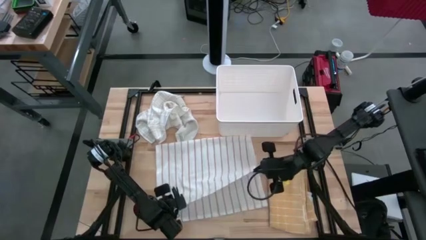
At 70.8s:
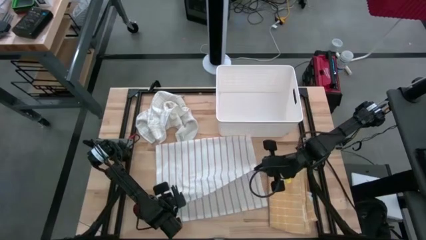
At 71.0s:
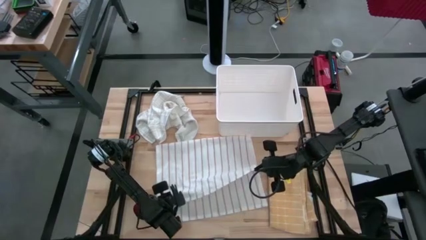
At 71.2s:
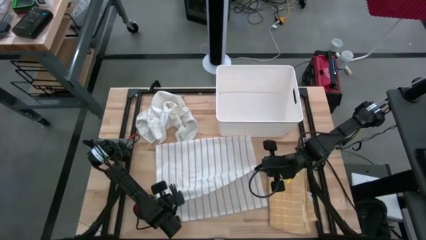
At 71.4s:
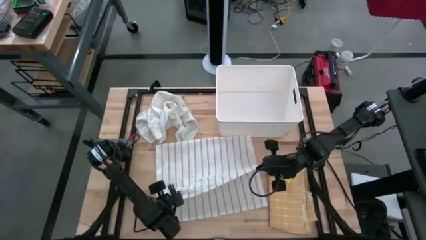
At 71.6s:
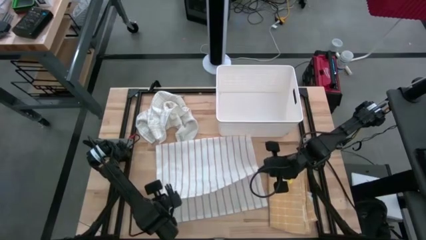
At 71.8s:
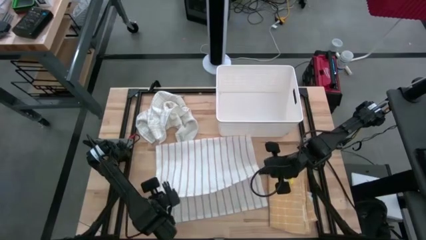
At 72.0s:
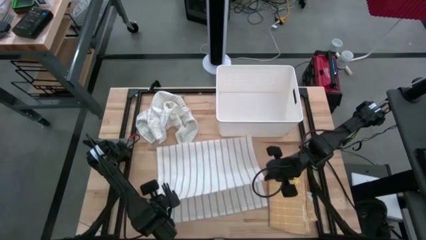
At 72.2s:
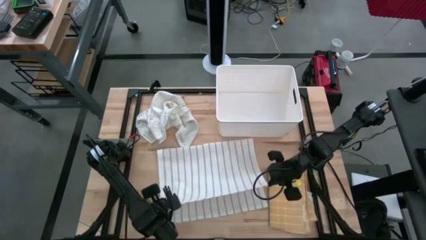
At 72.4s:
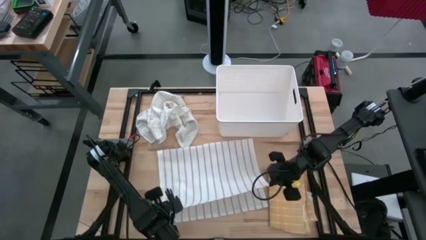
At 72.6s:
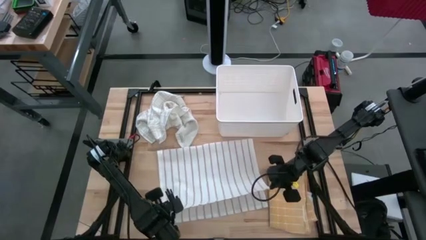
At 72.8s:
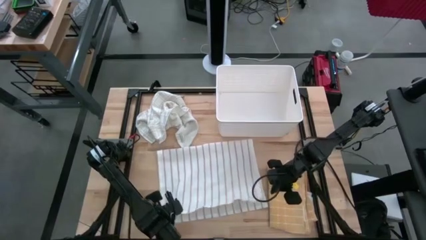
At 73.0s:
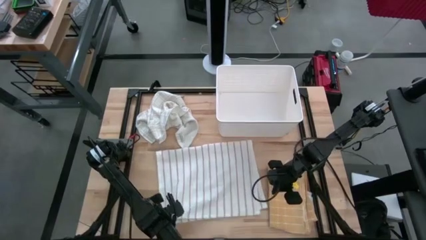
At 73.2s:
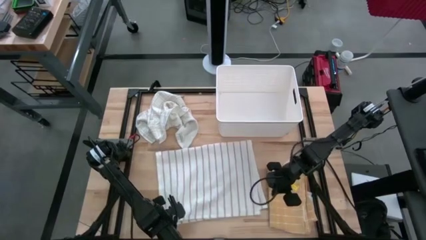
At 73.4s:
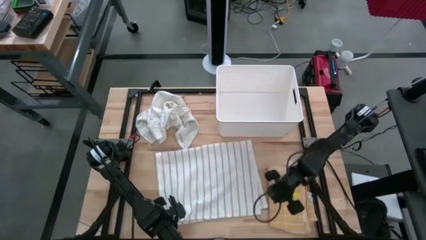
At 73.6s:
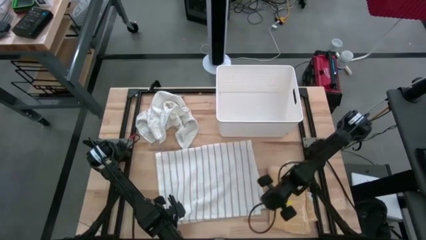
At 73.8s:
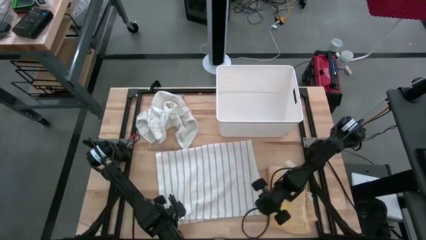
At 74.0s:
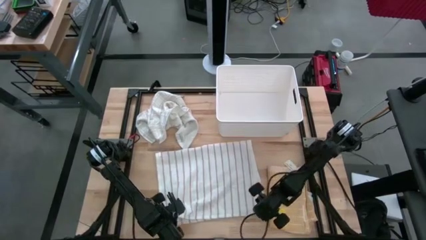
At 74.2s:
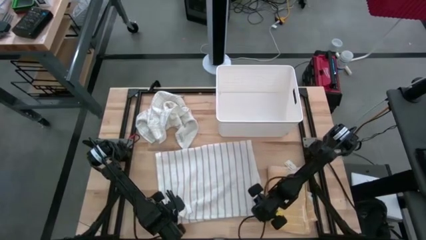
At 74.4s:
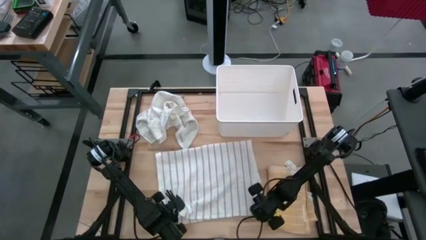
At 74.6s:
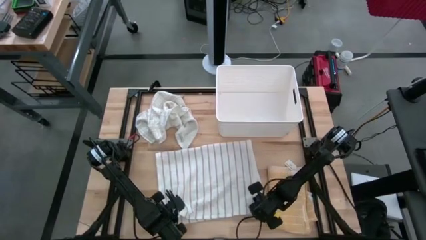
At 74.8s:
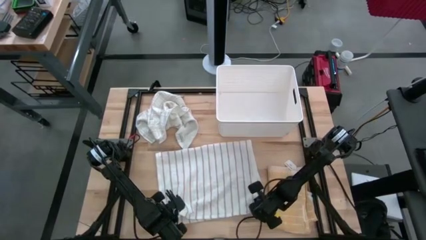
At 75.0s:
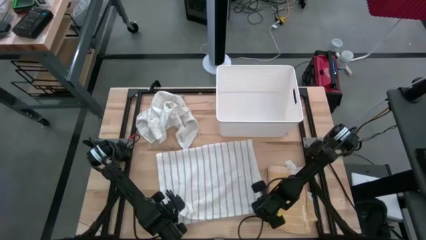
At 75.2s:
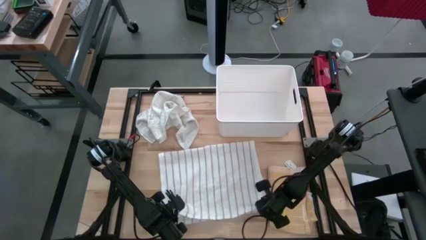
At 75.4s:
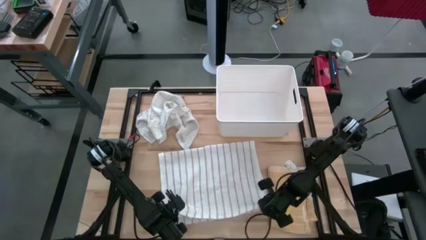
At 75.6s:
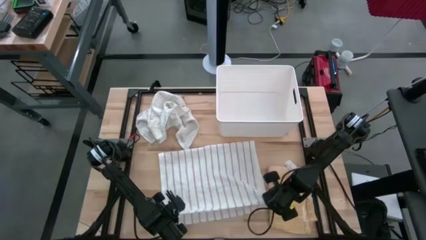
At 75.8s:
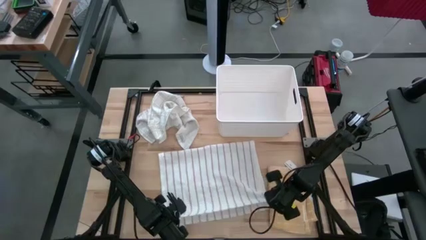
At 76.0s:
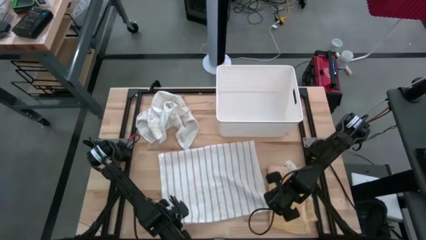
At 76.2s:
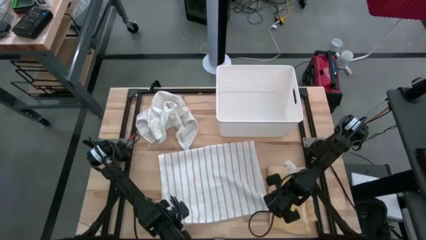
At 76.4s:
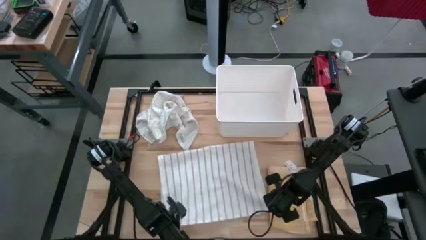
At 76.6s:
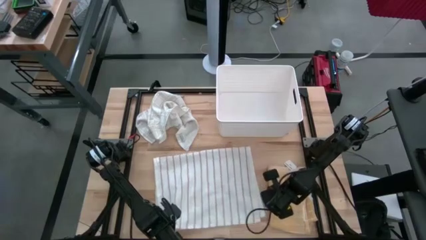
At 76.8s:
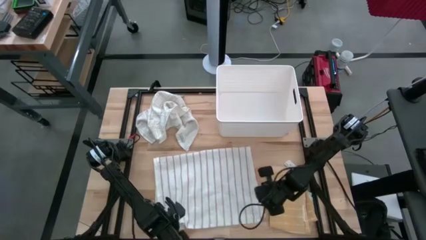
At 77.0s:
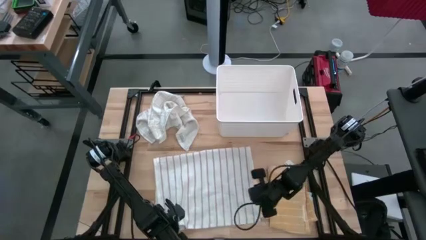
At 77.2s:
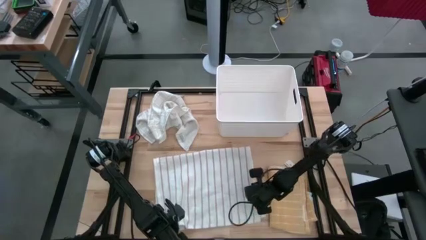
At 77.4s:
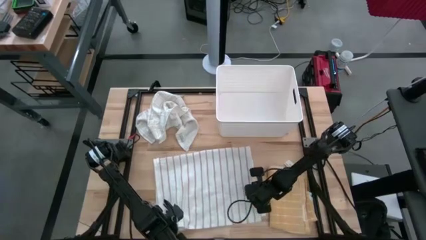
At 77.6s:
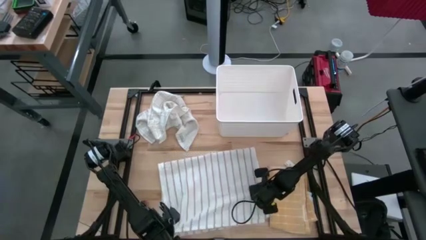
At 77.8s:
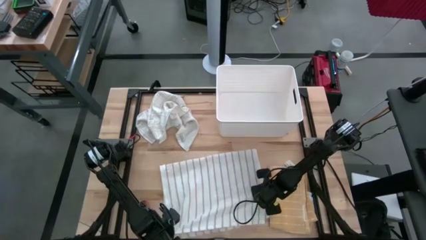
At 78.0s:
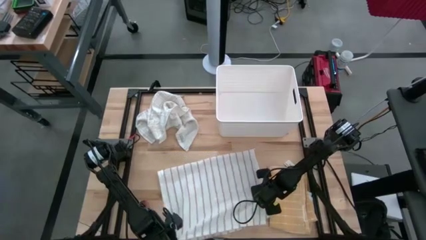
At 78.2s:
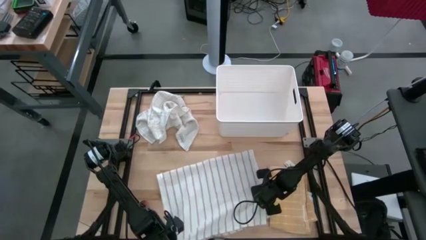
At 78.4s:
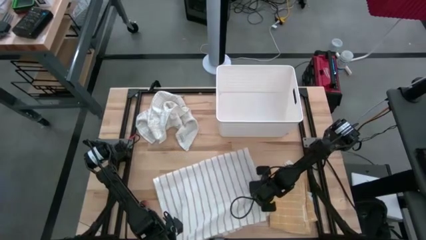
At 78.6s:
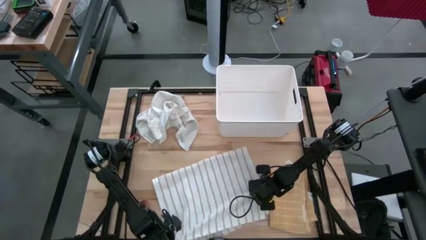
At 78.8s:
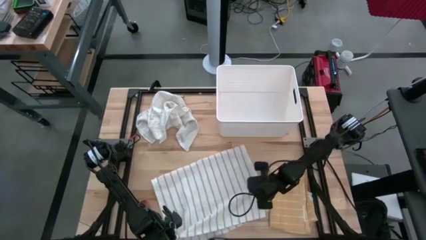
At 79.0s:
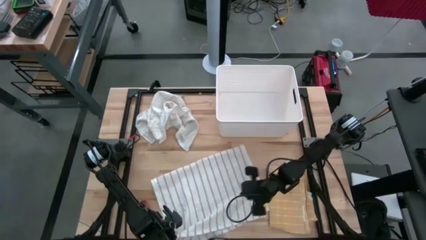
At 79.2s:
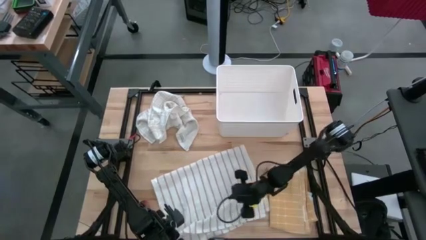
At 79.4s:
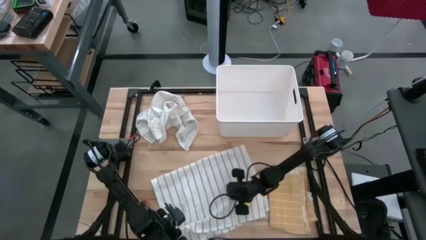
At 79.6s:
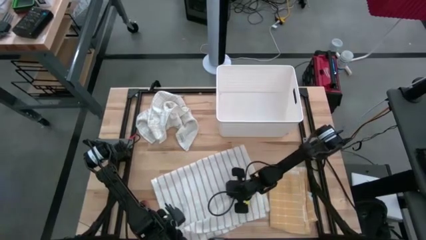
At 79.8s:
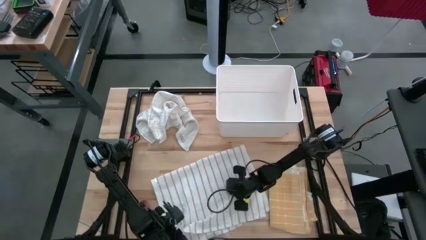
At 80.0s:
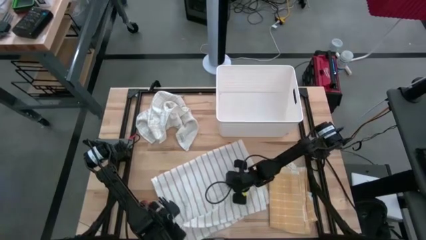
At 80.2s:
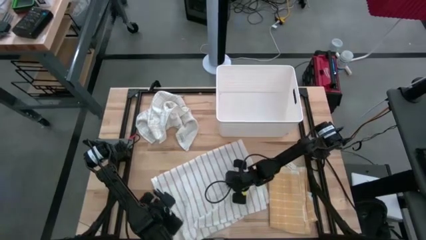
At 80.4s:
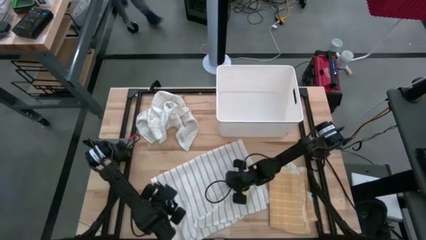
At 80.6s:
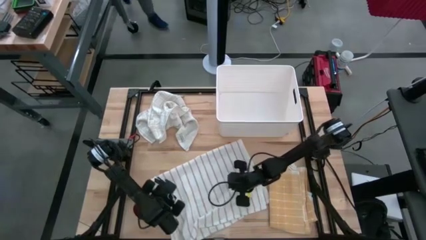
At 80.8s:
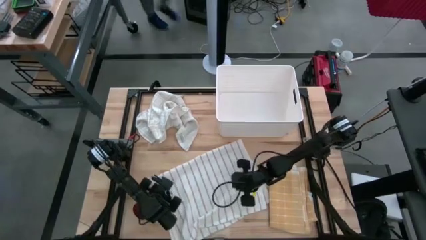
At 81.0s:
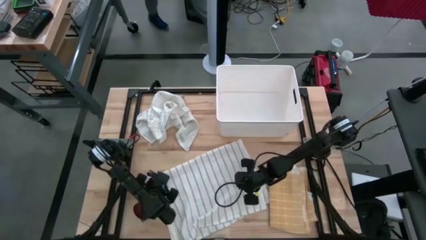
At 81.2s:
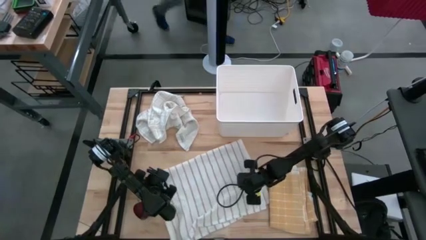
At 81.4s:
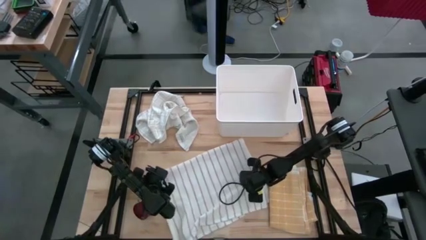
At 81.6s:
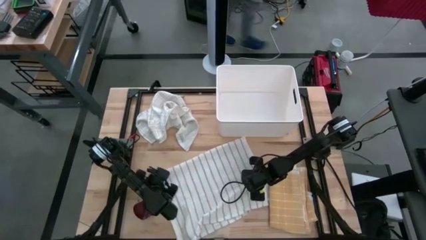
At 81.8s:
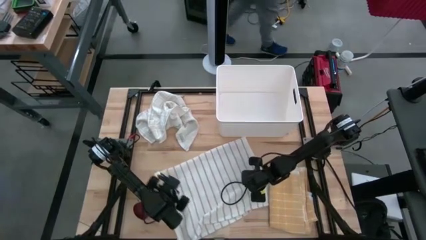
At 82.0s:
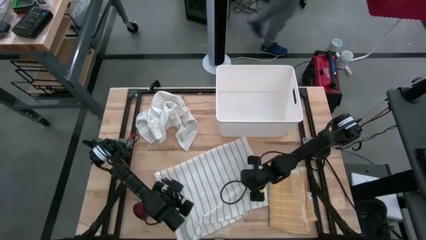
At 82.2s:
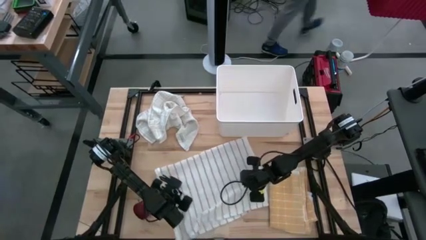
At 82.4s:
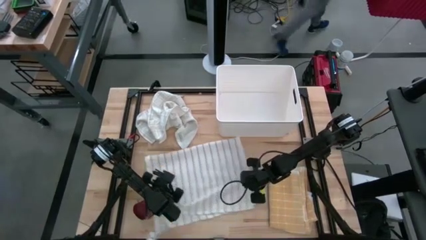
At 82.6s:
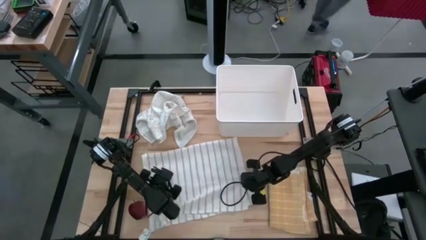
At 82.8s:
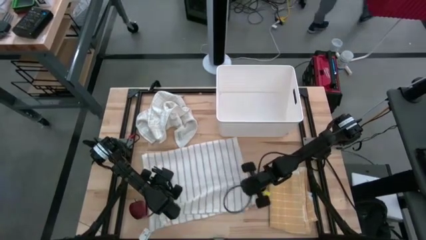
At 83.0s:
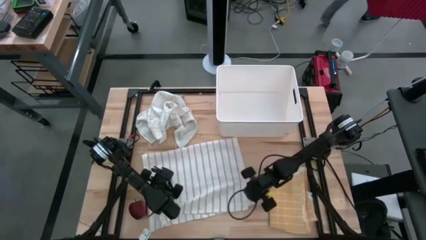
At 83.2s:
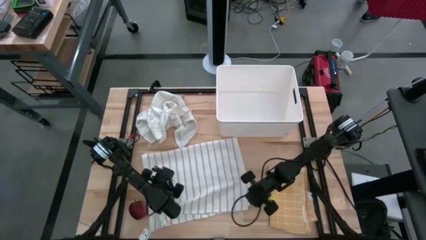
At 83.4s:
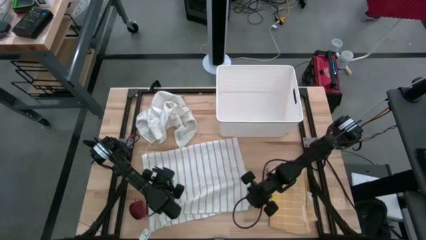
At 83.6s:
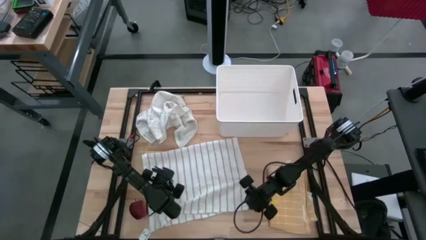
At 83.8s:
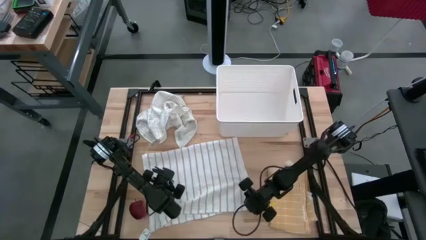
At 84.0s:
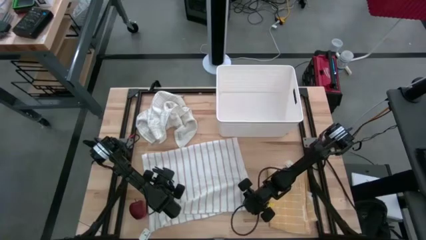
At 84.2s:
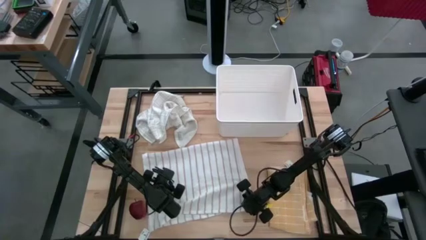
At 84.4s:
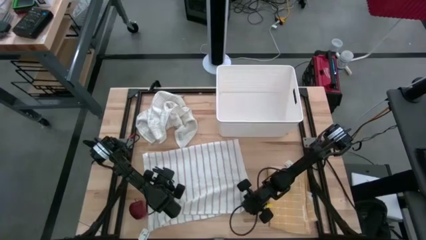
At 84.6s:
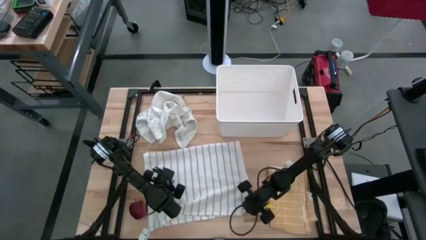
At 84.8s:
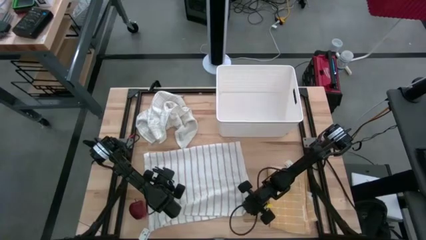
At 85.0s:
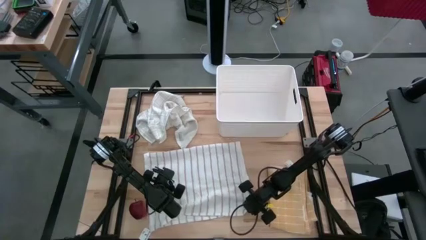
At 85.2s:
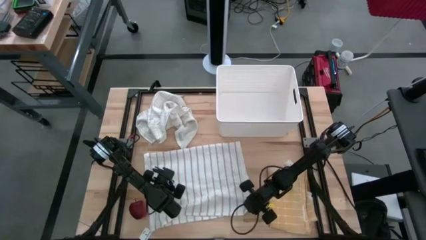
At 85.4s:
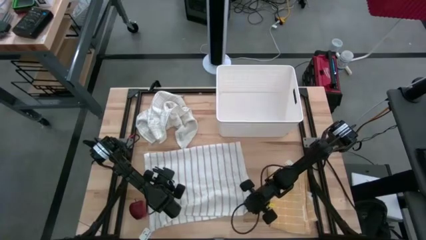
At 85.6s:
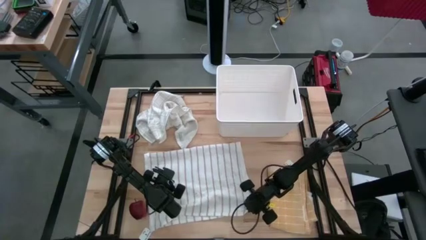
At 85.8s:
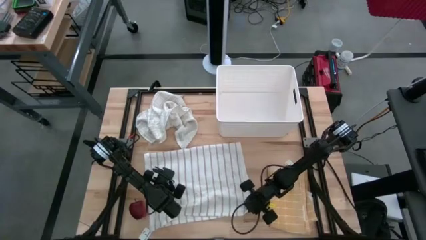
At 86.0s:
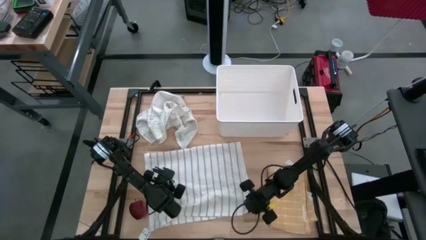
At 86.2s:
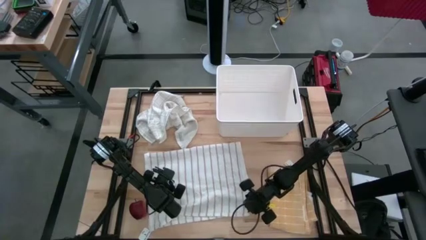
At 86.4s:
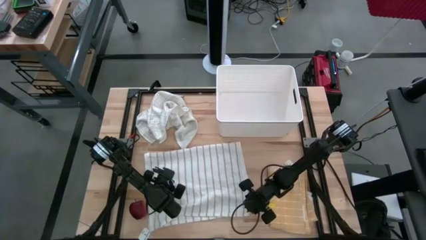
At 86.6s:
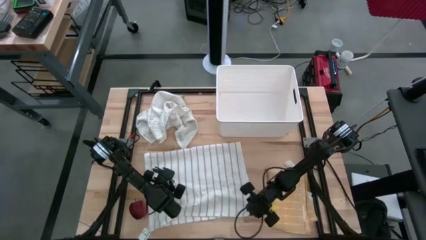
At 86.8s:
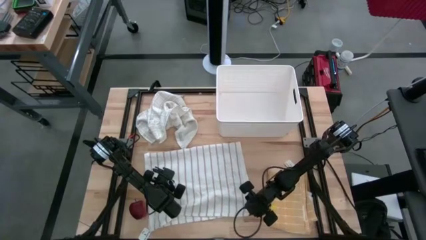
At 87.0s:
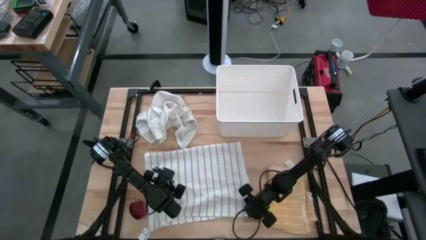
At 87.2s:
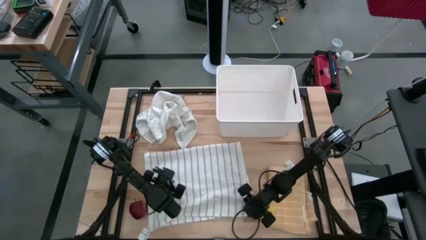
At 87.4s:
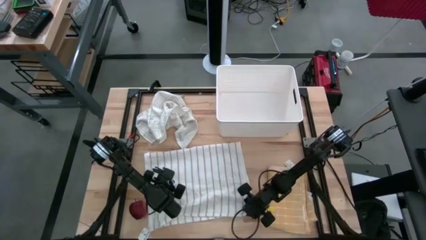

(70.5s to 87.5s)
Task: Fold towel
Fold the white striped towel
